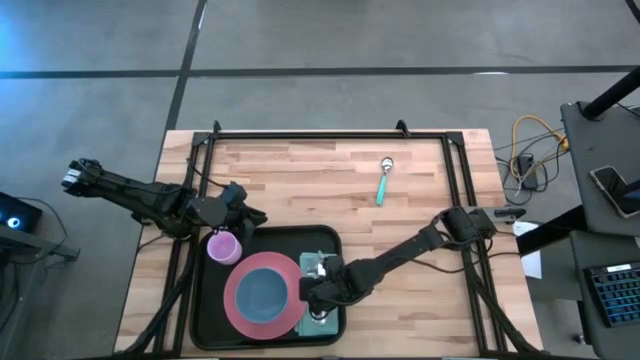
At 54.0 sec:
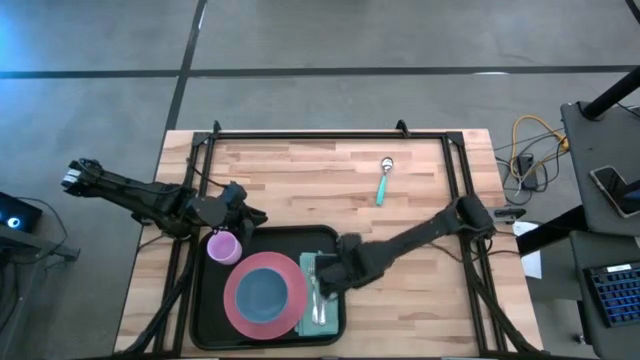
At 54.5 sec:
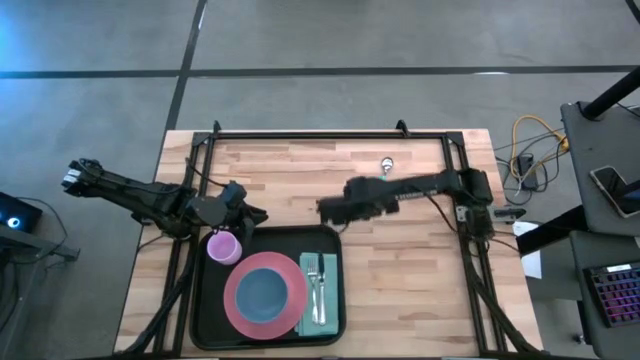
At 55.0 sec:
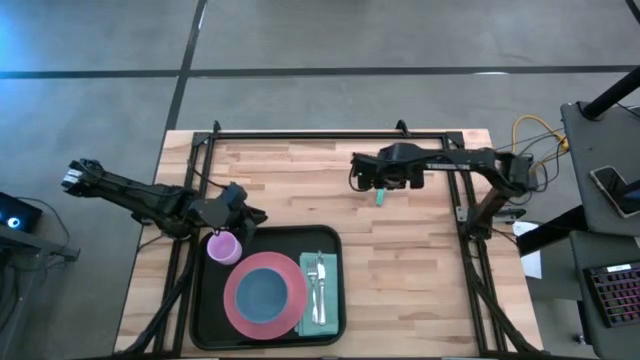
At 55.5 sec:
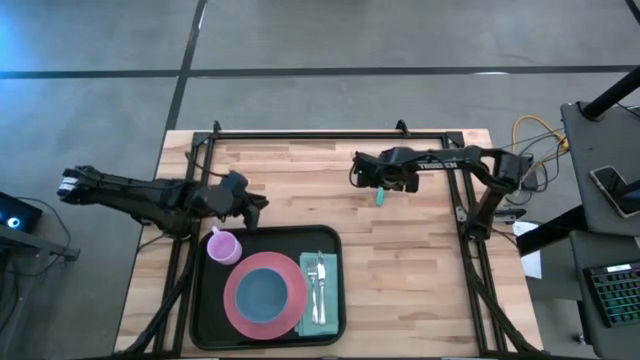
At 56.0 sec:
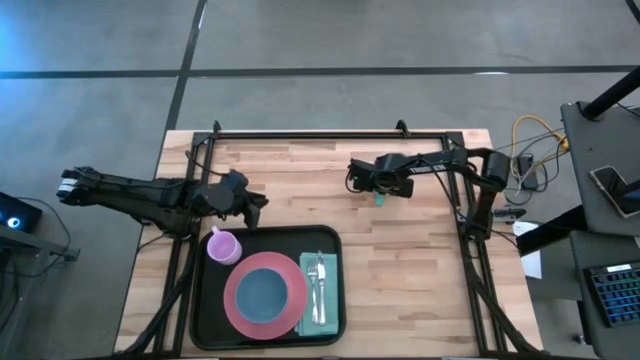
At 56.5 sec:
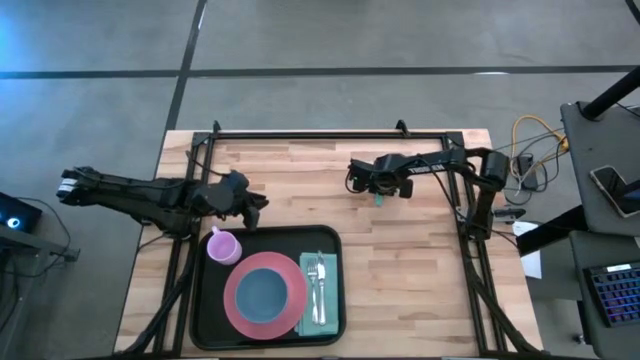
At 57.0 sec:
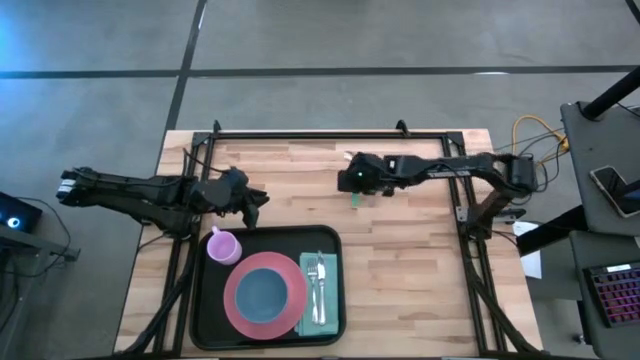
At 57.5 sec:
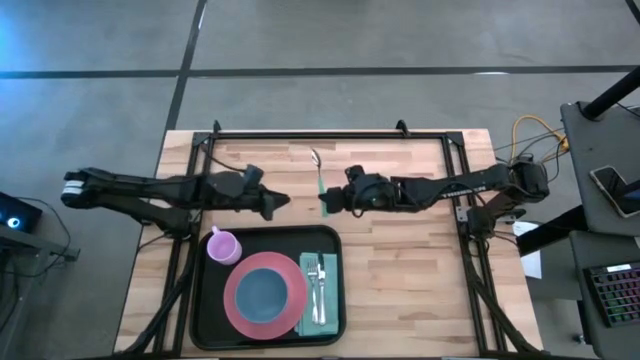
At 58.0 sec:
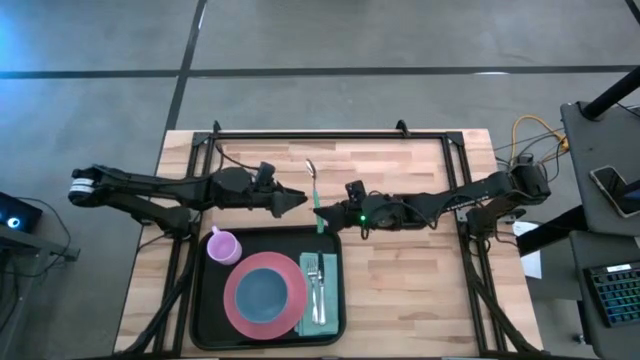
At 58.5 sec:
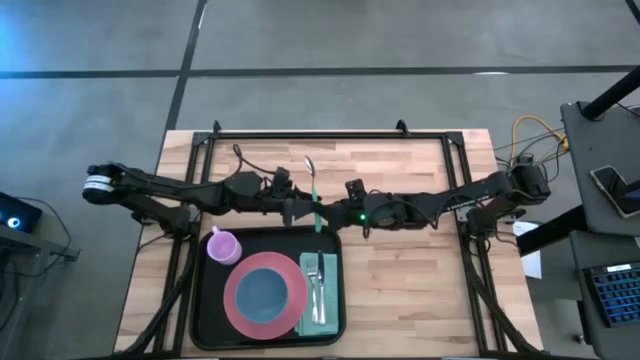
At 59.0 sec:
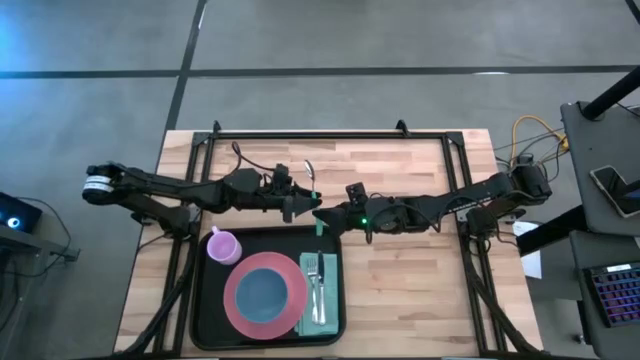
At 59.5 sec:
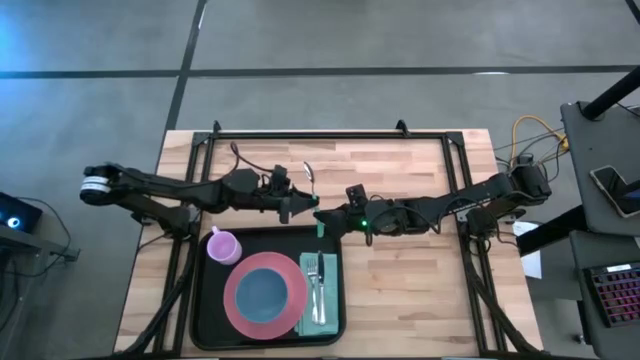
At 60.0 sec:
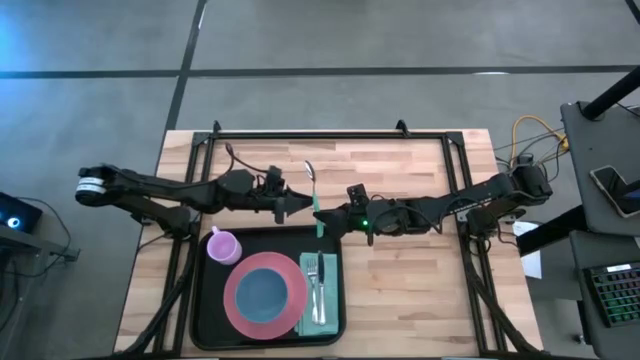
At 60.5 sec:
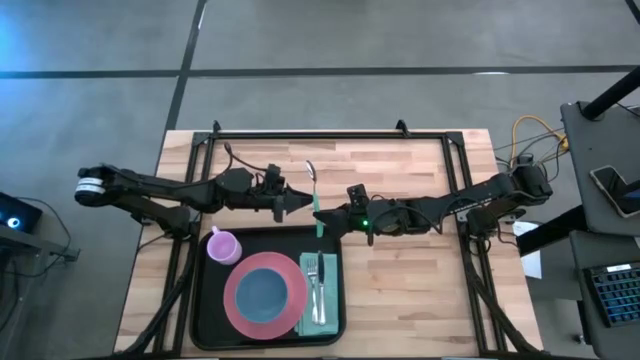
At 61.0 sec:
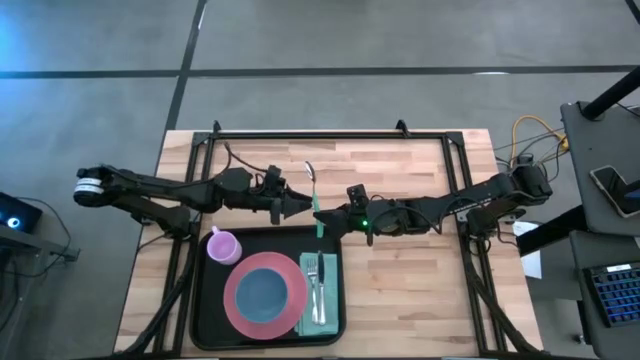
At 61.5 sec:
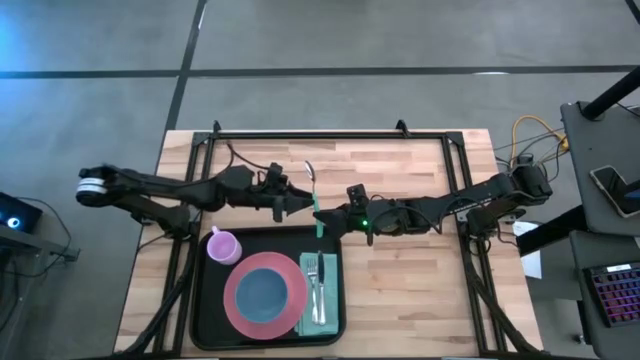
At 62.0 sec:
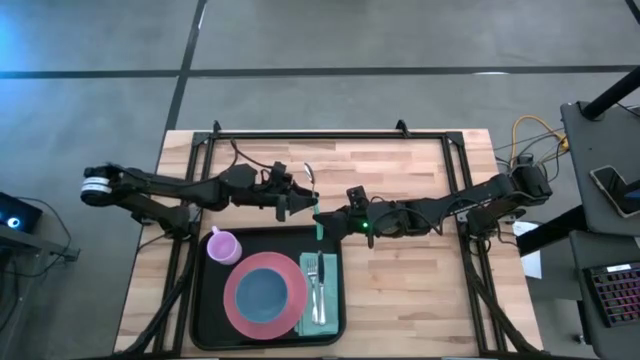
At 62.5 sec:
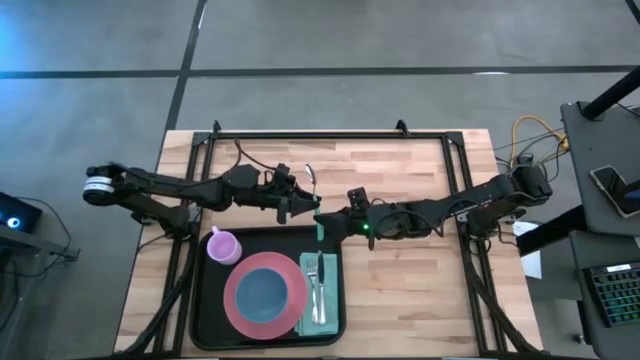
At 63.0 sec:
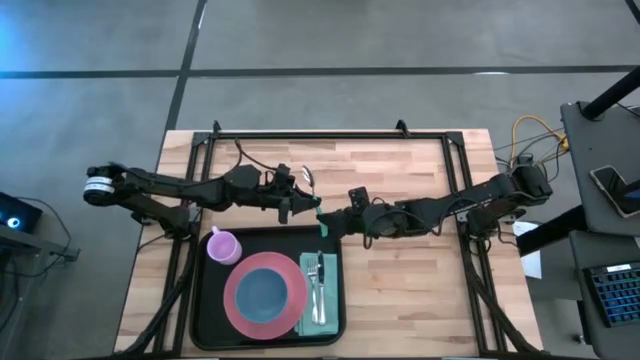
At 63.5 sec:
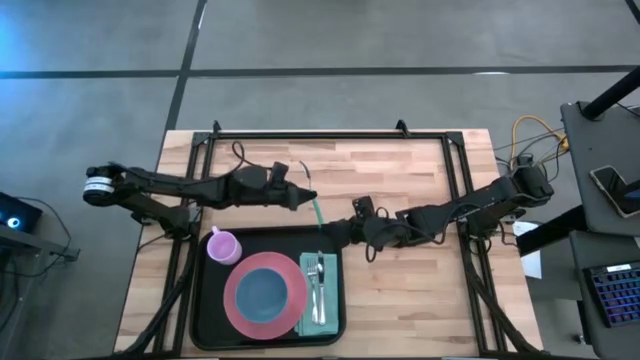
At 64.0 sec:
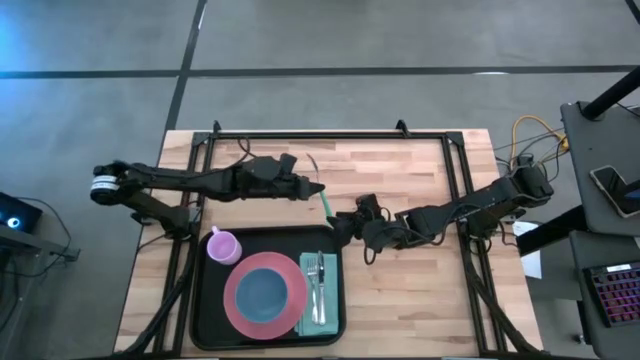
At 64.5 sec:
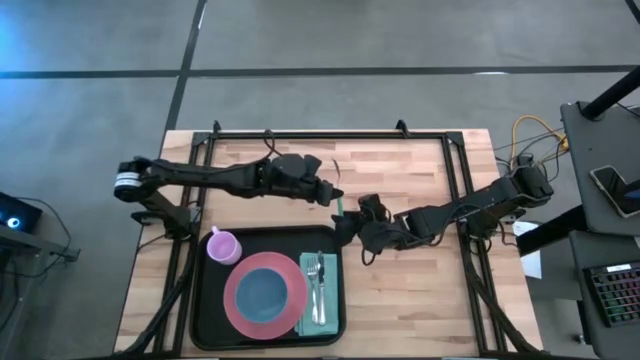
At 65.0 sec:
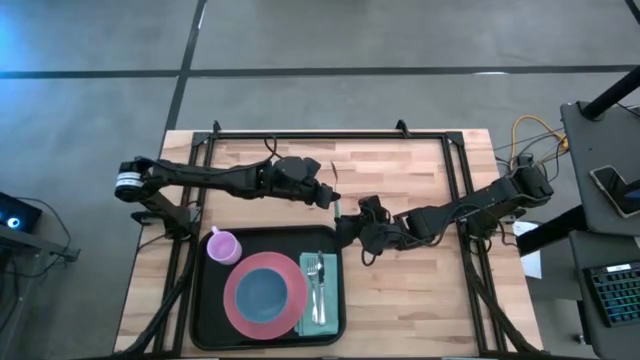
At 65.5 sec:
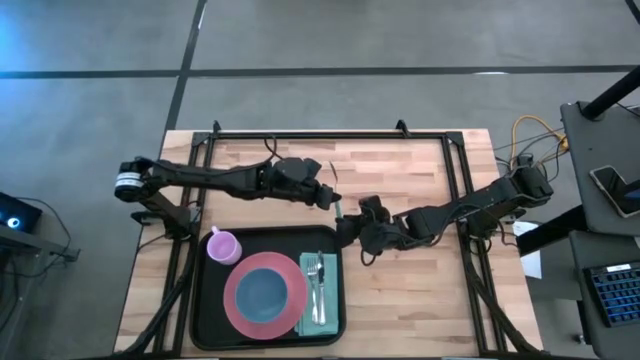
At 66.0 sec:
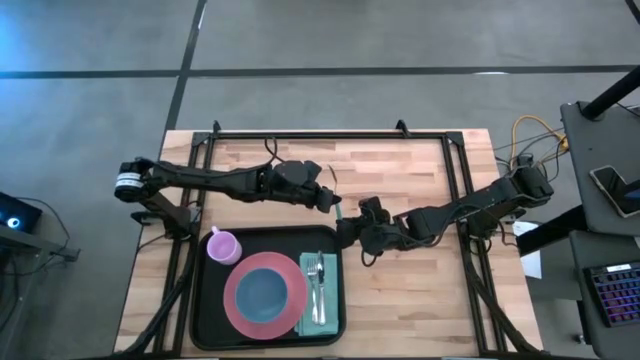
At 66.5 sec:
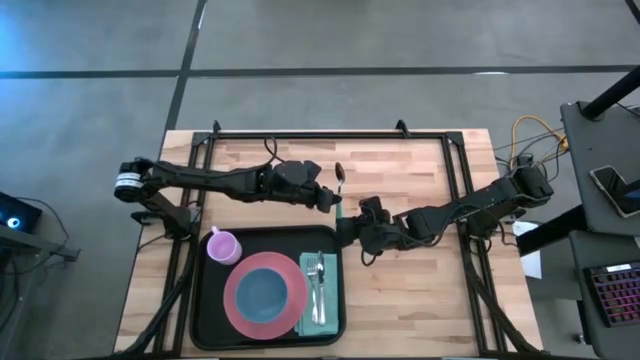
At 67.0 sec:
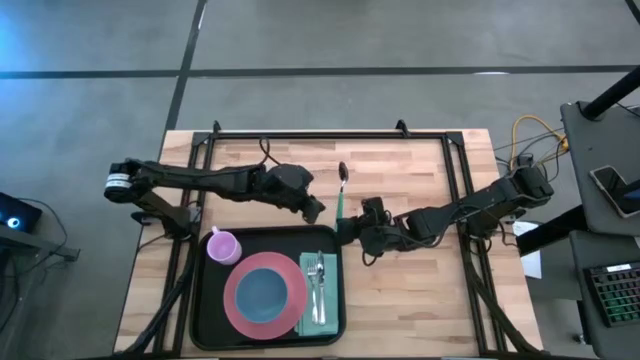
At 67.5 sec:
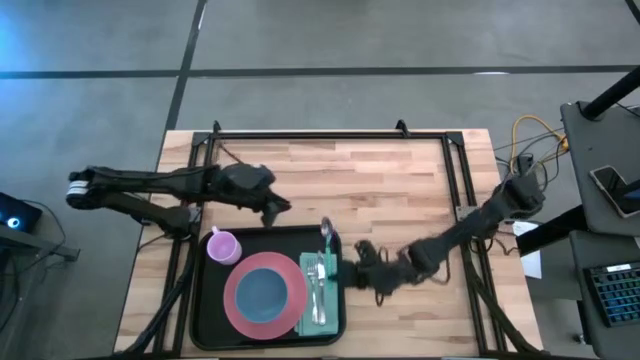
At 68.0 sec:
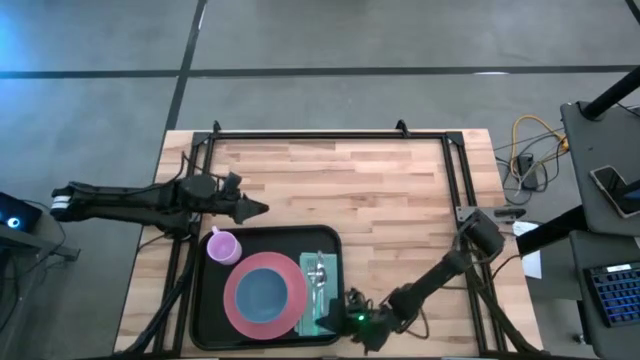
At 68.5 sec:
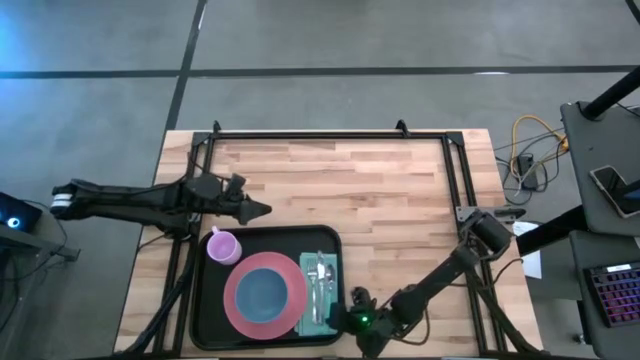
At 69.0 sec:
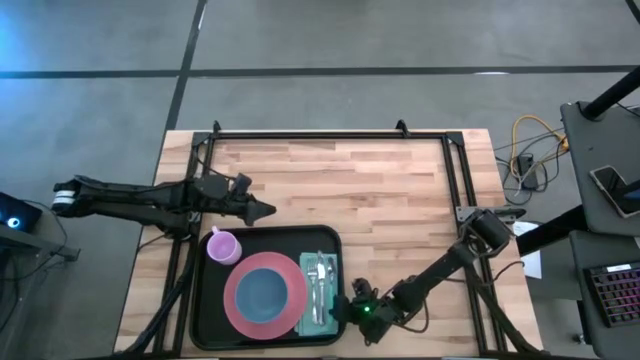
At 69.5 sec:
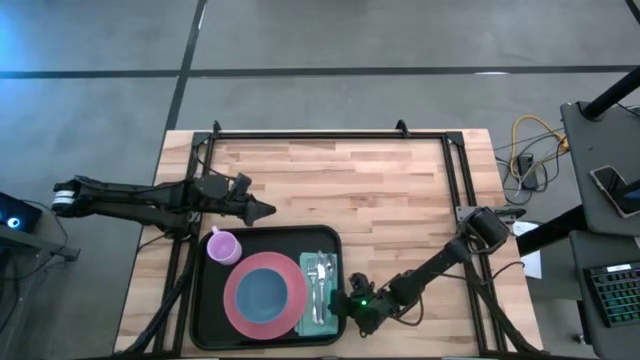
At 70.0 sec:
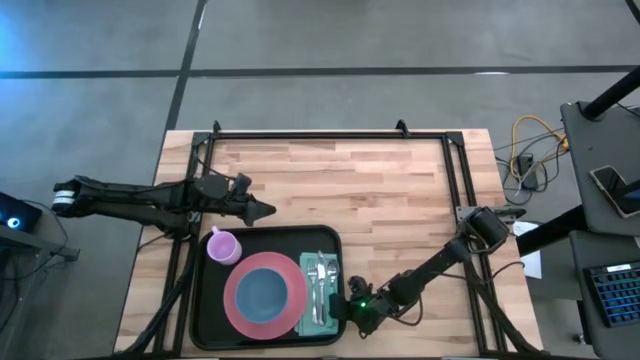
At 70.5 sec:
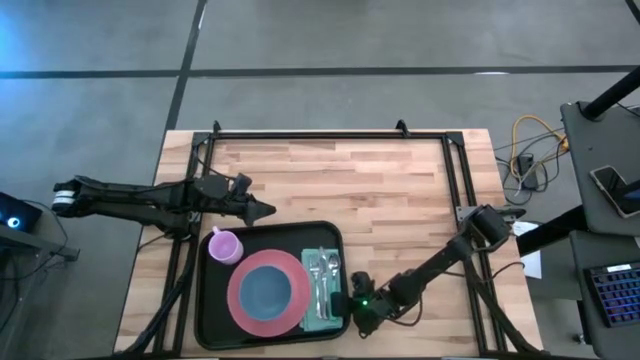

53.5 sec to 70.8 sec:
Task: Set up tray
Put the spoon on top of the table napkin beside the knife on the black tray

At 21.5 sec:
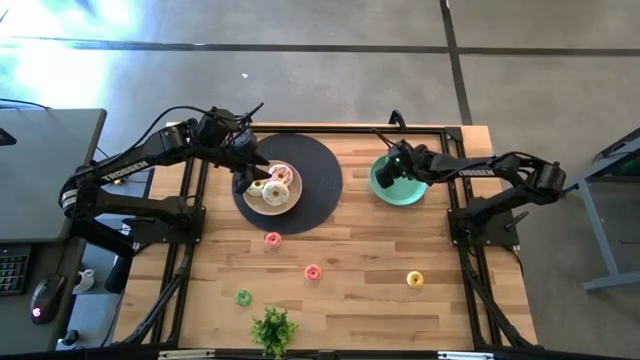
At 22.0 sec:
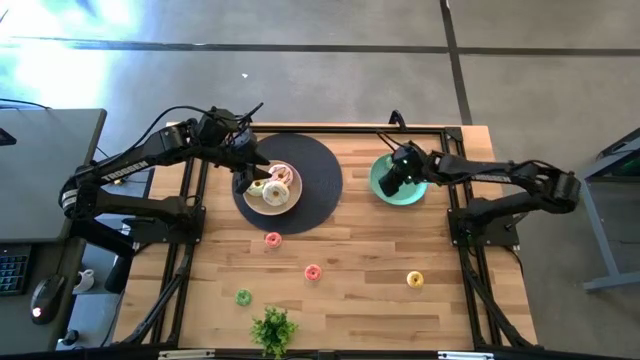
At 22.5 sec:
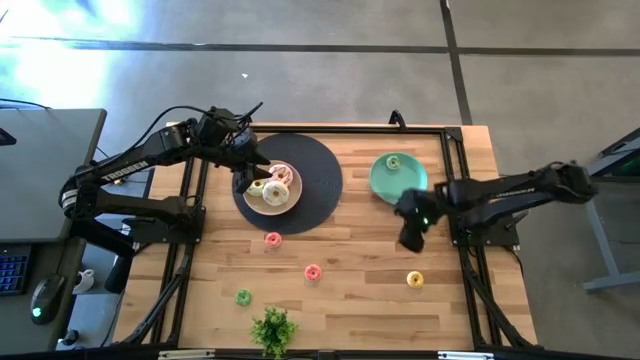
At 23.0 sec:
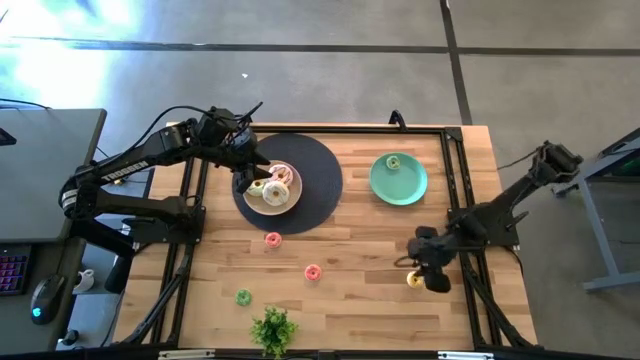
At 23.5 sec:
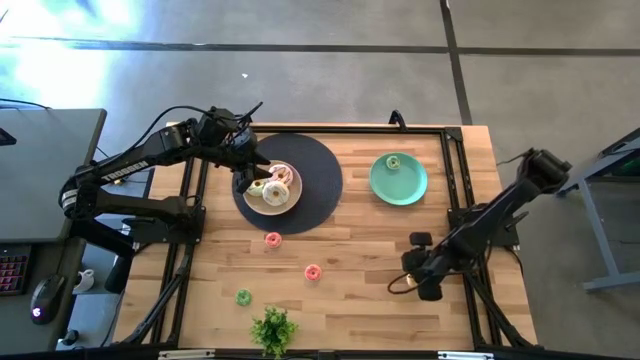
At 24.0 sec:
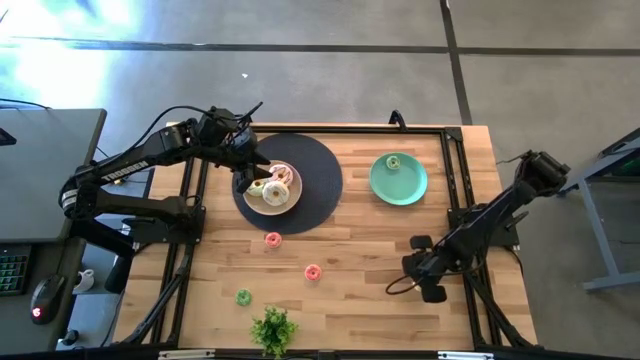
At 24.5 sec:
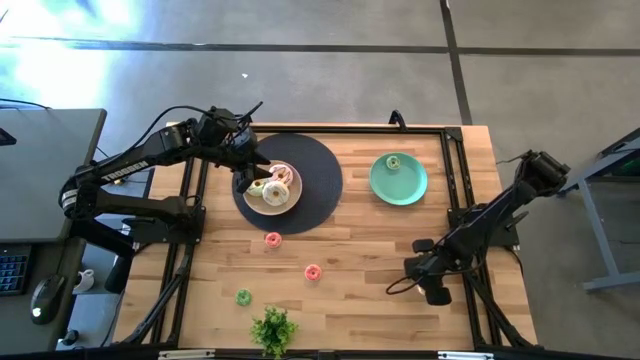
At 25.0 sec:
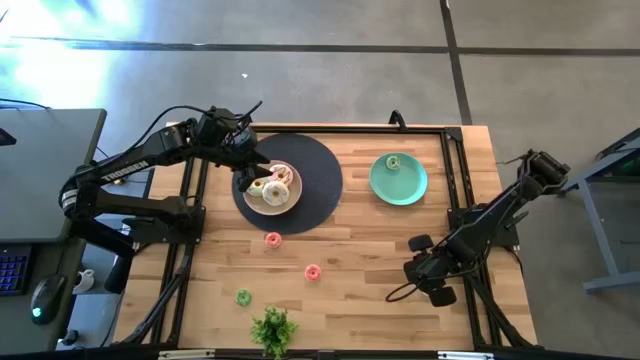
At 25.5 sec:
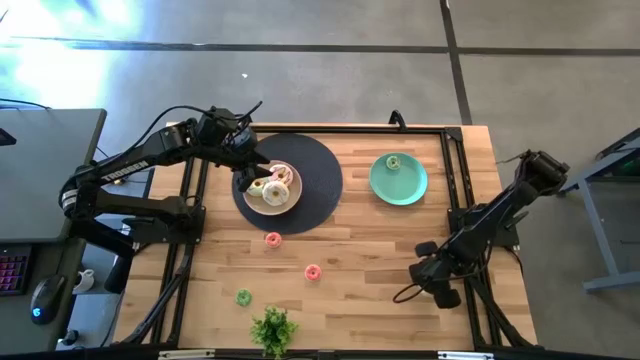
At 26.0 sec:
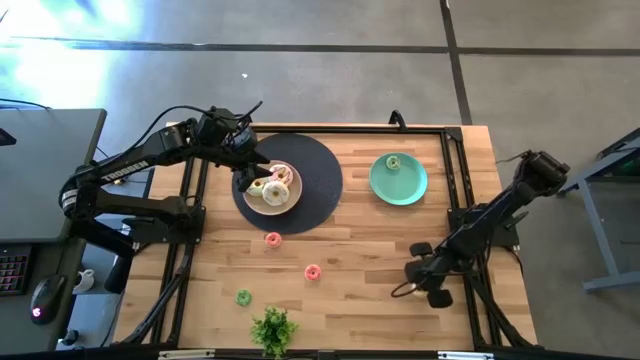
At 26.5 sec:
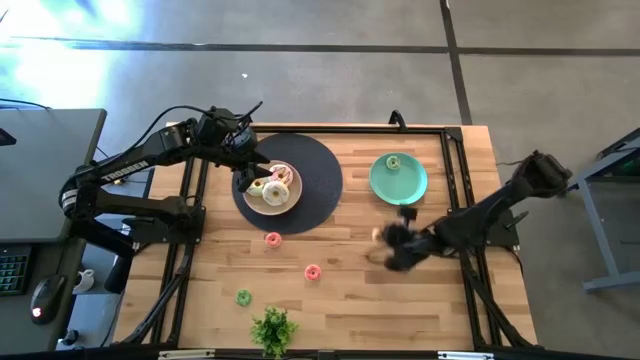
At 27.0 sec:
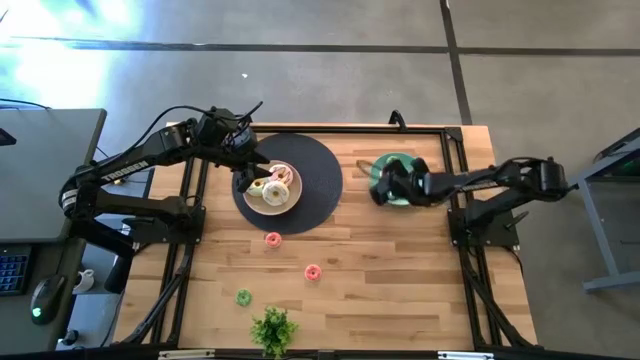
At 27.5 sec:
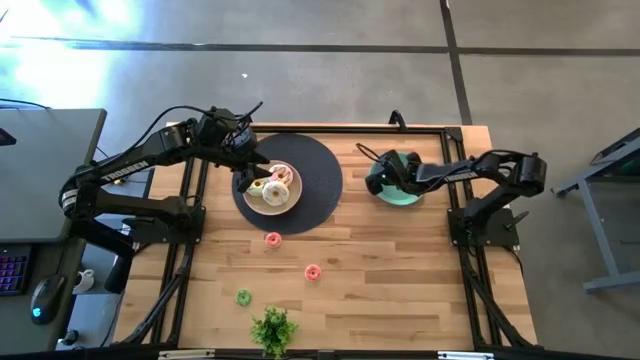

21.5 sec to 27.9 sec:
Task: Pick & Place donuts
Put the small yellow donut on the green plate
